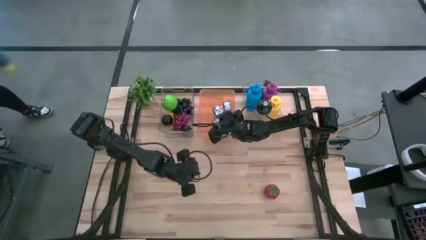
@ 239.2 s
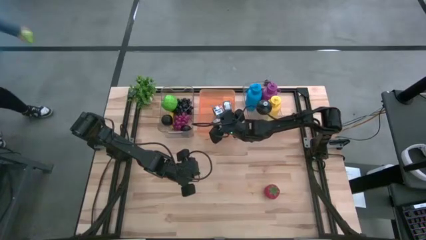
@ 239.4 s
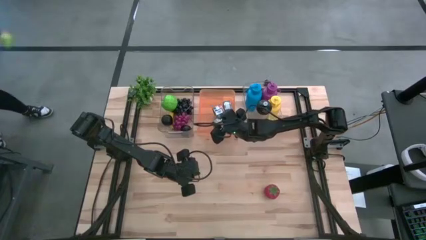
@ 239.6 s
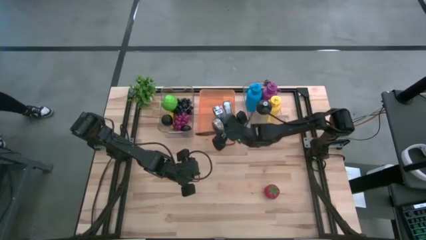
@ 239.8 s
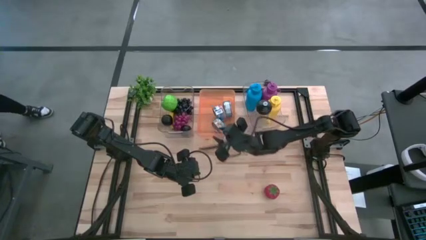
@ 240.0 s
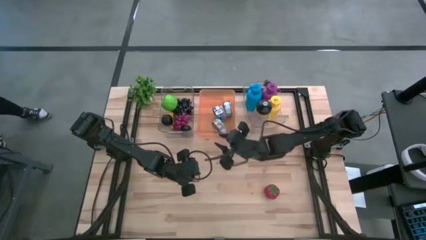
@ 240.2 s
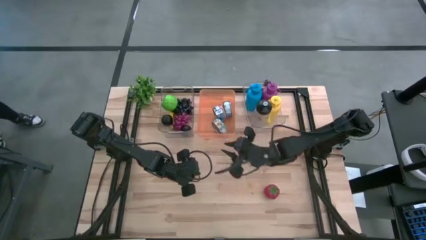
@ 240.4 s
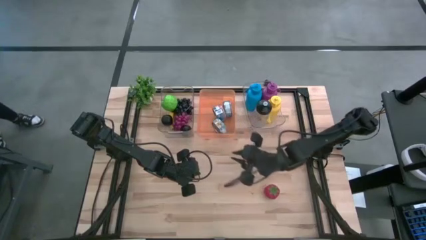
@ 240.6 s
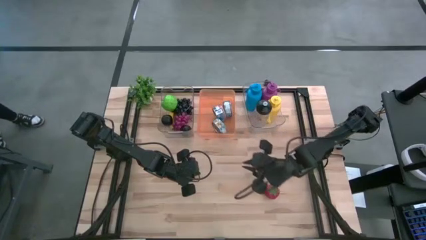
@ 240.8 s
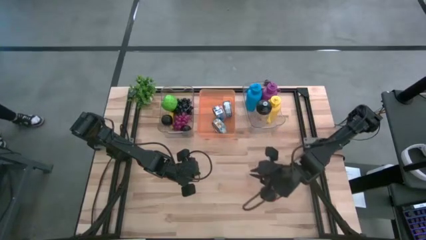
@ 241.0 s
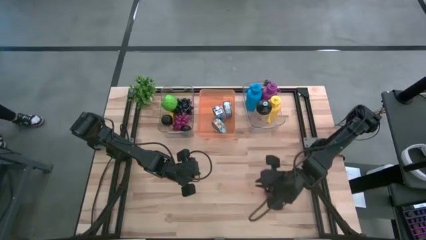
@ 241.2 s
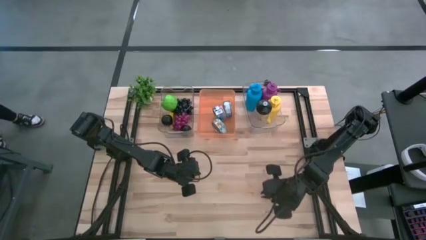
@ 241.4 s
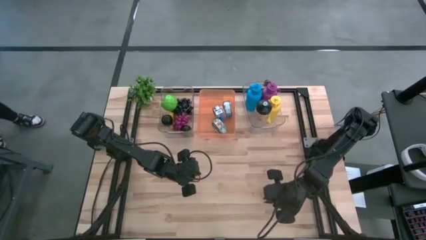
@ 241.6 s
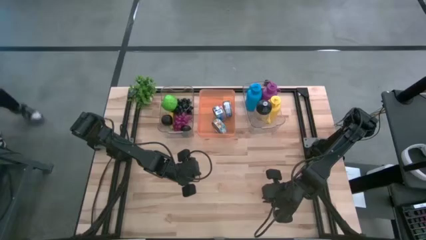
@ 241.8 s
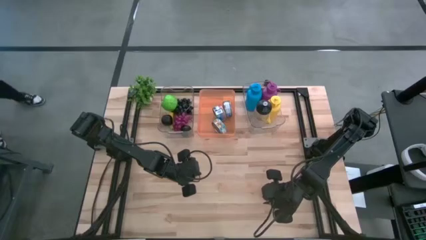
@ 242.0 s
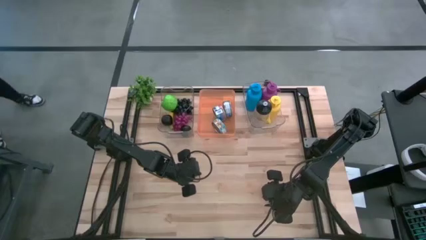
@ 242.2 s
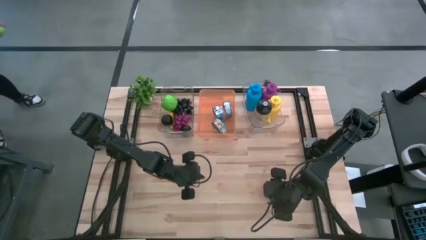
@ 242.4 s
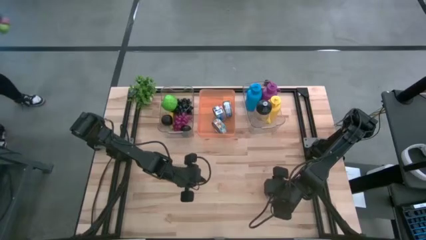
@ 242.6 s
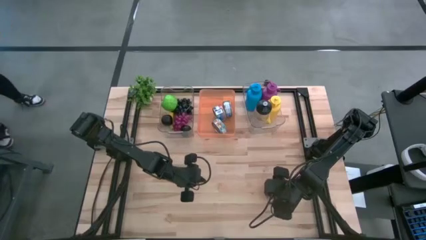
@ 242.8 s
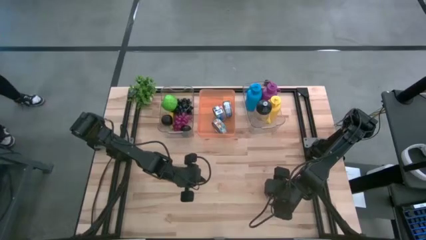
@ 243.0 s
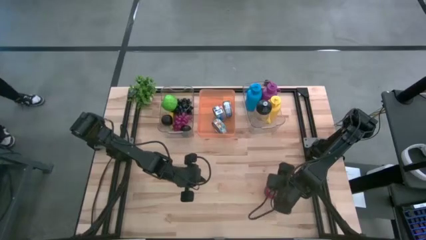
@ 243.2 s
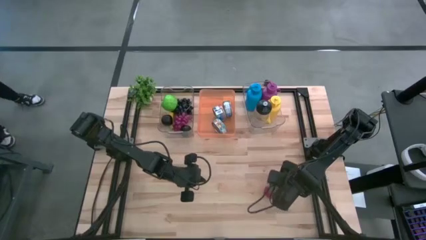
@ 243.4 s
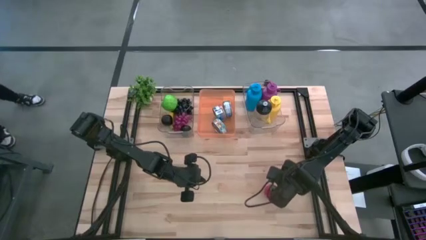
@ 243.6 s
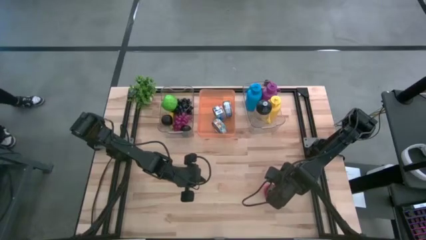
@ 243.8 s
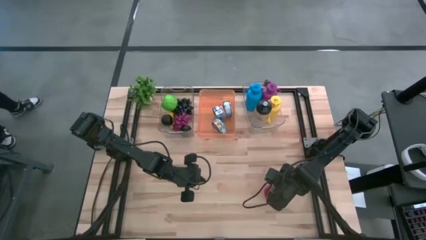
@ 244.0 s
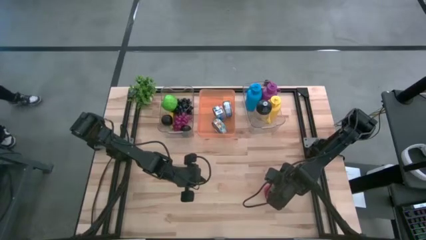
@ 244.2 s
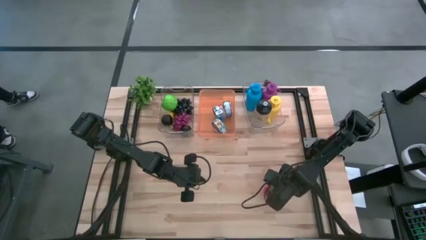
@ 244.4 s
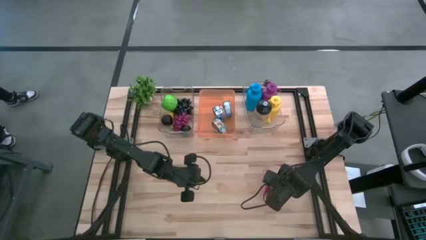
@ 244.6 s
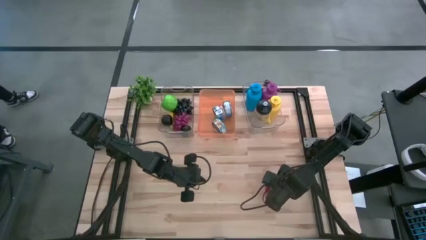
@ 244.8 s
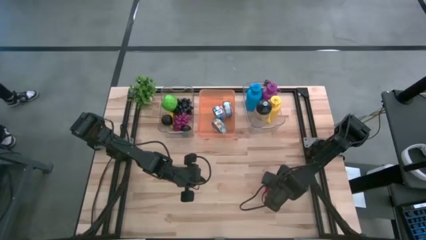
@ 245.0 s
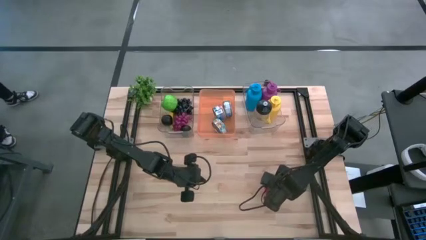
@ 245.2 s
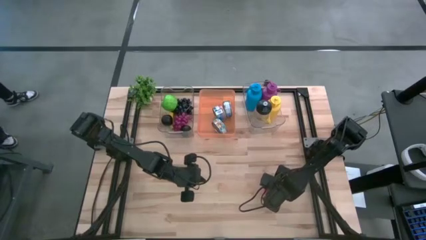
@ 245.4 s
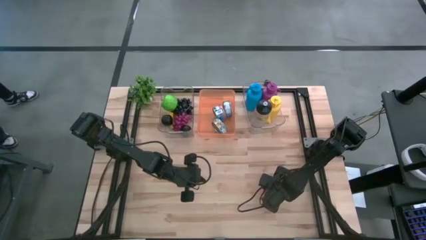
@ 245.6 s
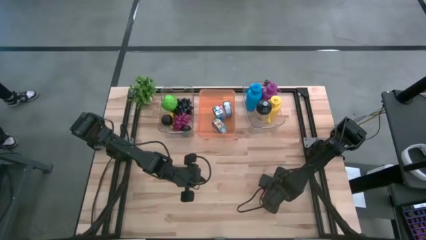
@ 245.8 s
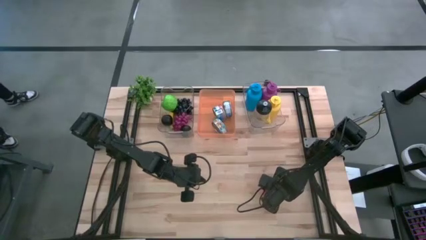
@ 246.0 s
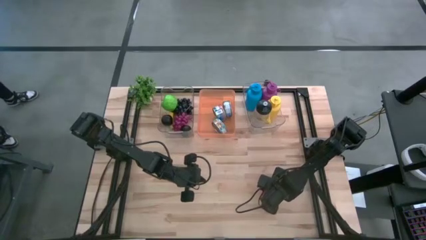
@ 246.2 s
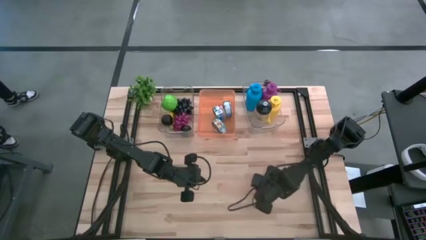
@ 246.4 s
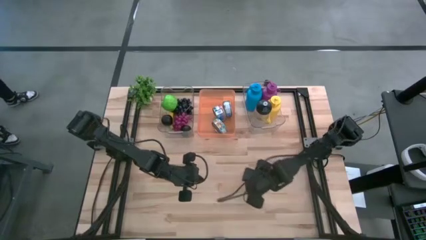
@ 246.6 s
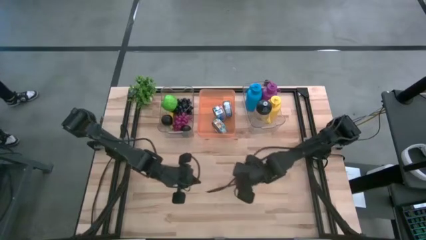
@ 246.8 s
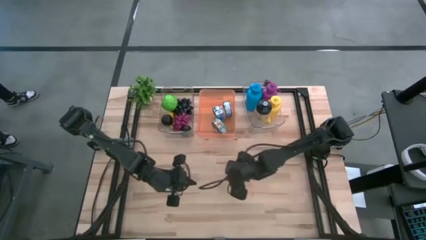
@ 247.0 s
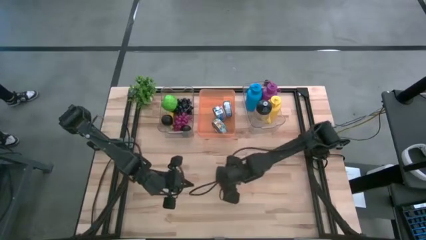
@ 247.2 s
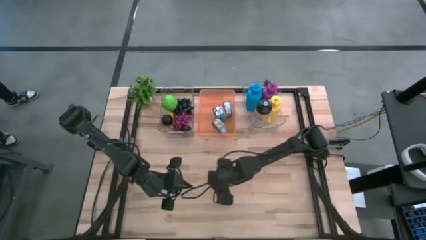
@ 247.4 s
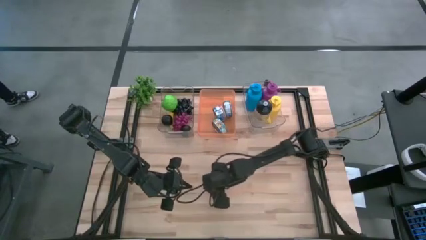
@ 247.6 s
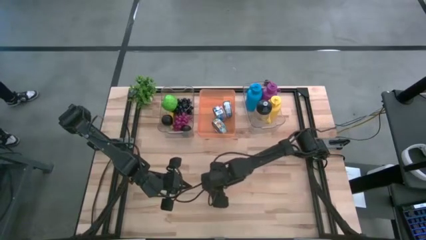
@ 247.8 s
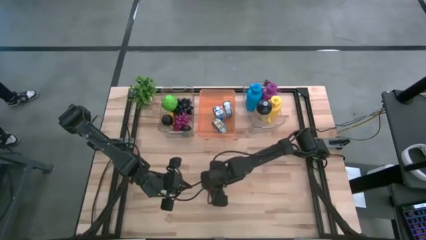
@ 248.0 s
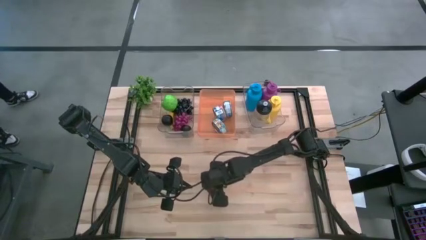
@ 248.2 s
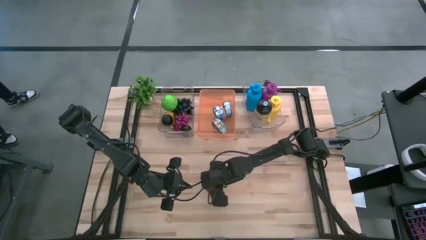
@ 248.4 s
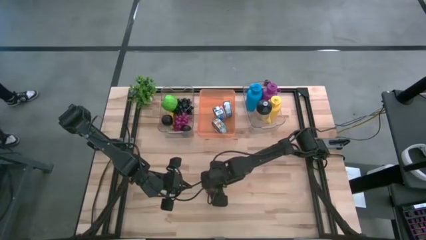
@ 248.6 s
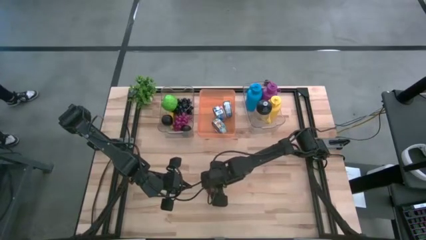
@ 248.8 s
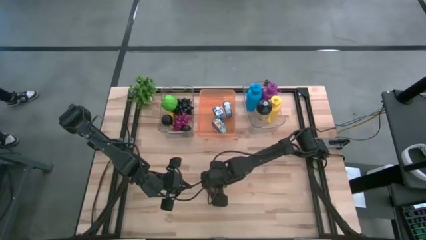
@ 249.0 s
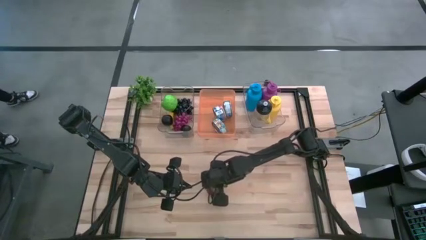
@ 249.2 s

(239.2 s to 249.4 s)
Task: Pick & Place Food Item
Put the red tomato into the left transparent bin

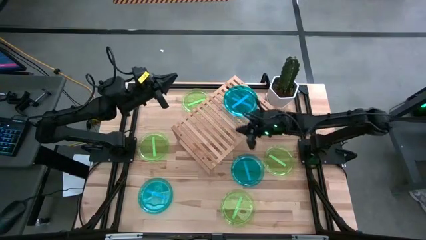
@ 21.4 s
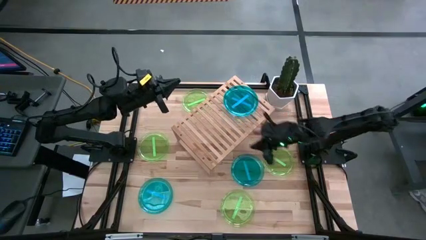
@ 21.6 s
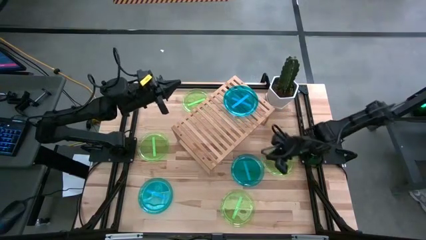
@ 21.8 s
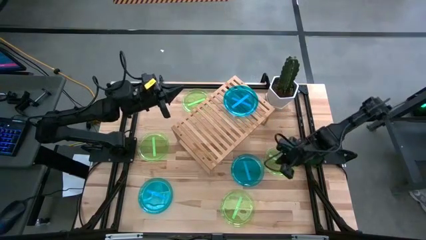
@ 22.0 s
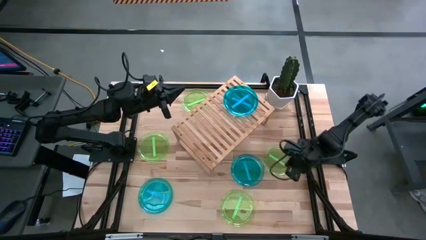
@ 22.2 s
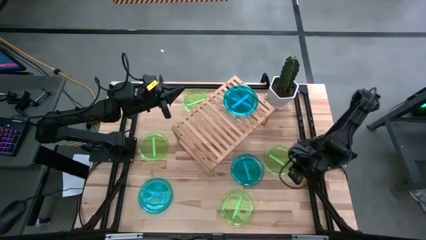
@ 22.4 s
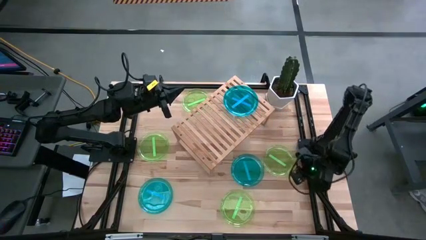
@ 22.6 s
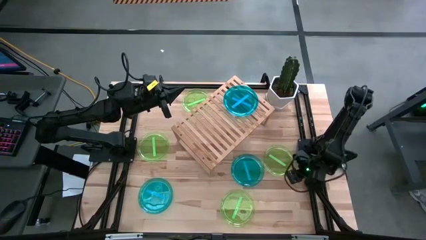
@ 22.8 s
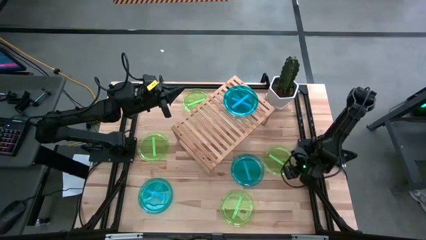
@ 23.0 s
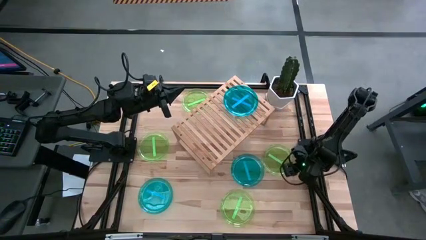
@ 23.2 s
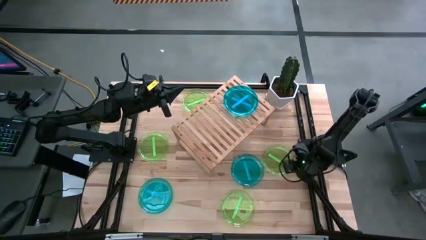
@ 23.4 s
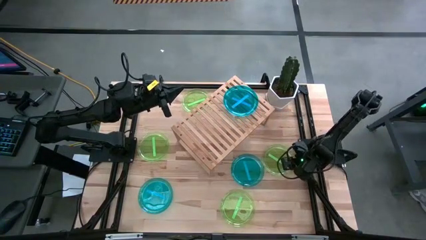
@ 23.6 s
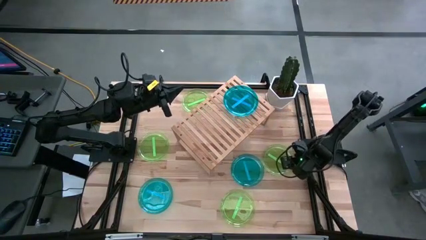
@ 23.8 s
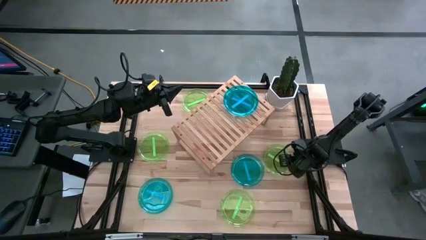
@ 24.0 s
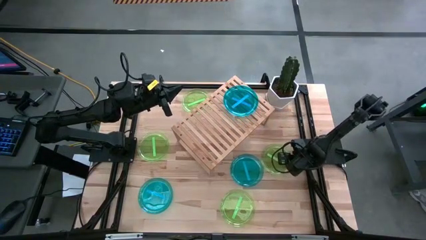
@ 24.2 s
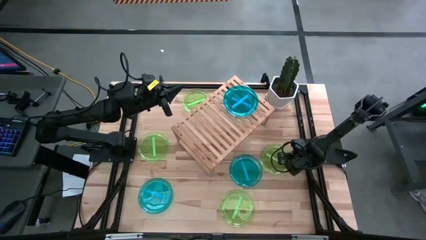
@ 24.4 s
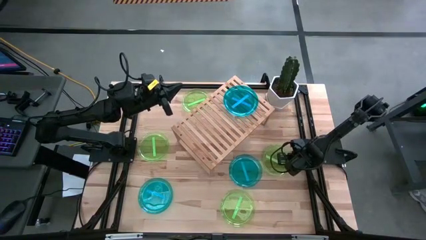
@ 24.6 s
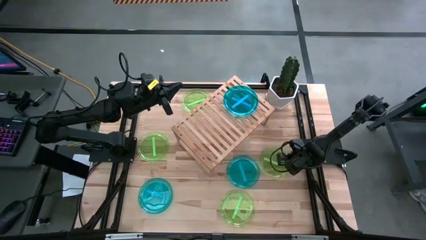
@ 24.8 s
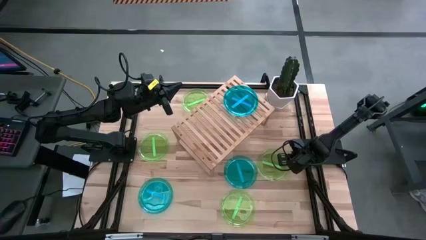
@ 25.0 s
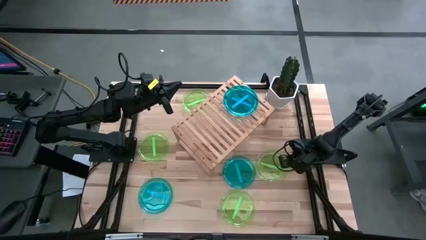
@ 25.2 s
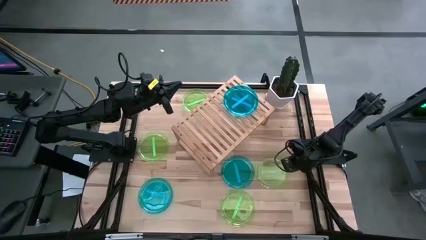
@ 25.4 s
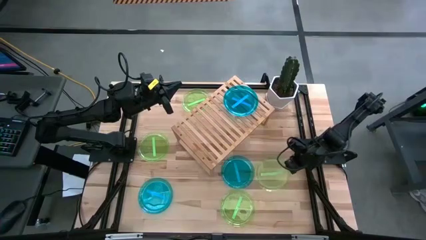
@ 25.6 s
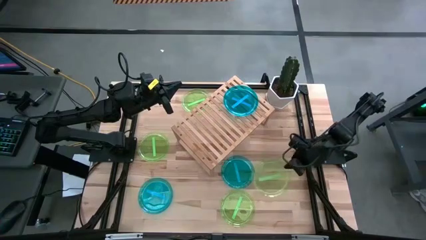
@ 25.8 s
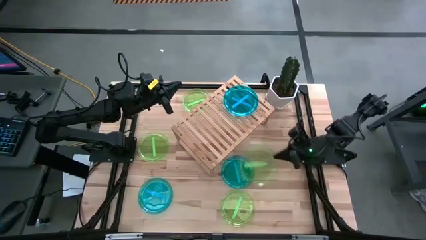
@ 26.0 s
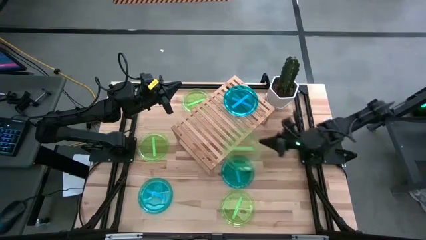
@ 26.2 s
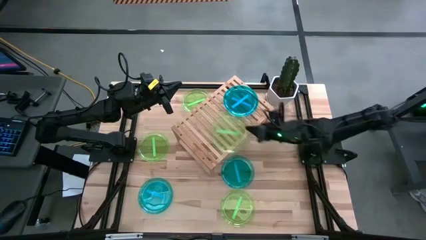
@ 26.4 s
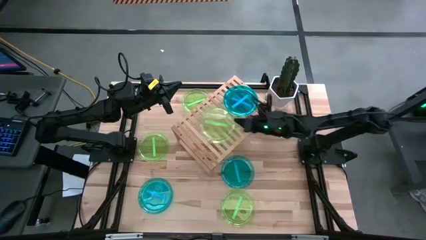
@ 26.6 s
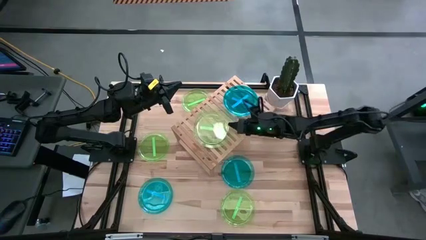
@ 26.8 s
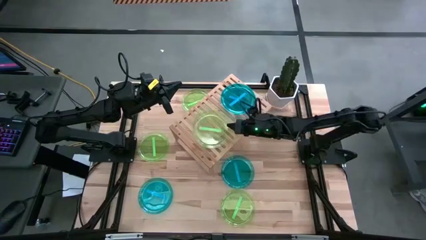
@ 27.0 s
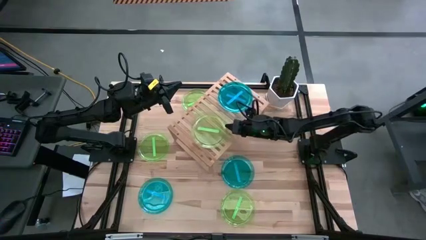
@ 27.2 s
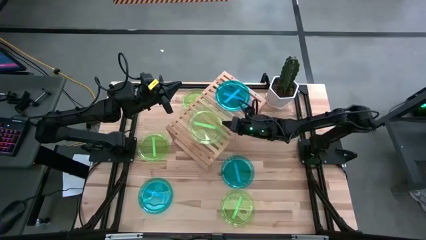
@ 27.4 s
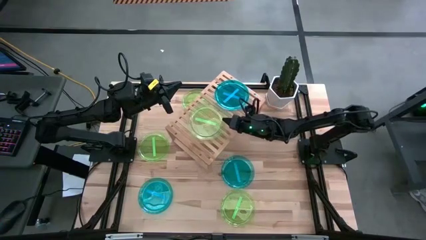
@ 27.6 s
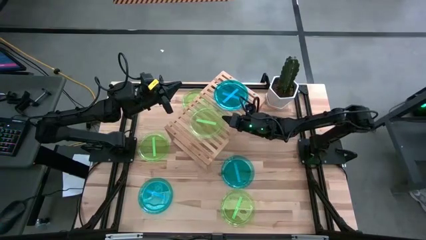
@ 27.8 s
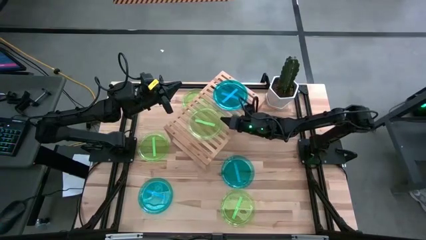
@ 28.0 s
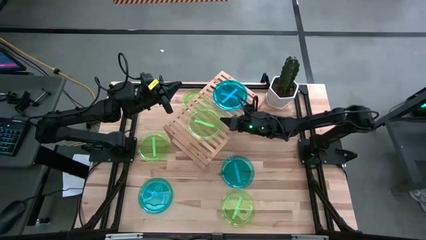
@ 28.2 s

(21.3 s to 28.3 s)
Task: Place and stack plates onto a shelf
Put the green plate on the shelf
